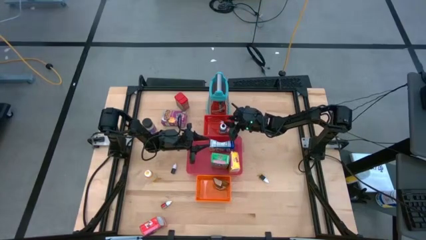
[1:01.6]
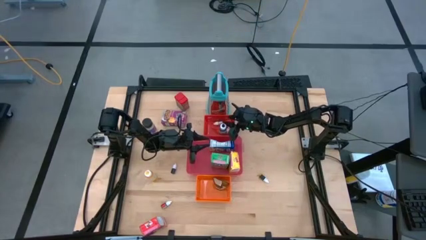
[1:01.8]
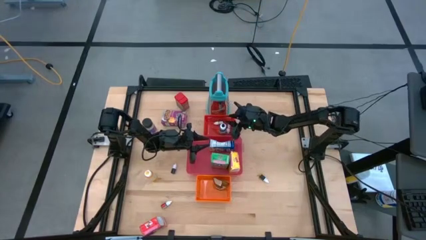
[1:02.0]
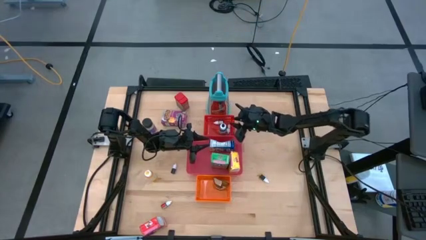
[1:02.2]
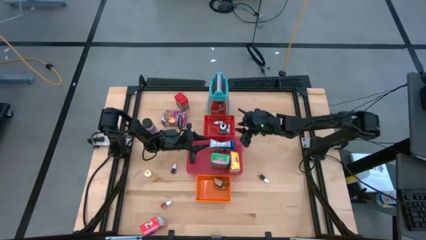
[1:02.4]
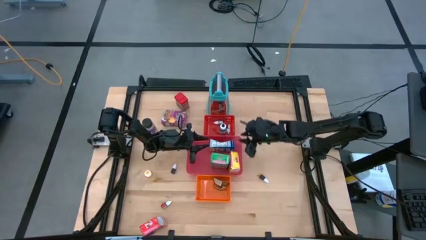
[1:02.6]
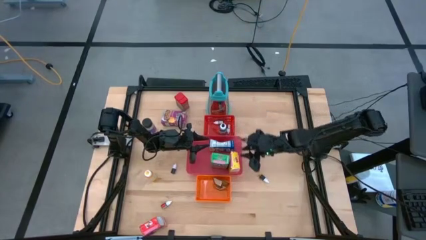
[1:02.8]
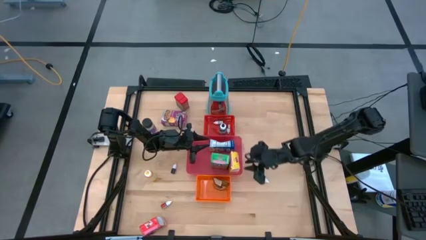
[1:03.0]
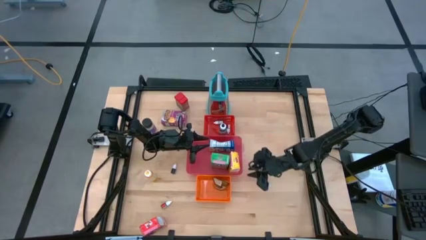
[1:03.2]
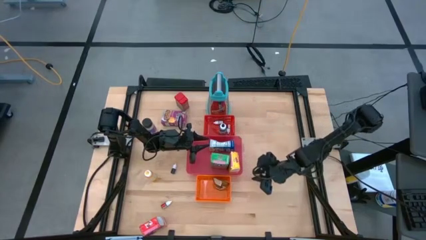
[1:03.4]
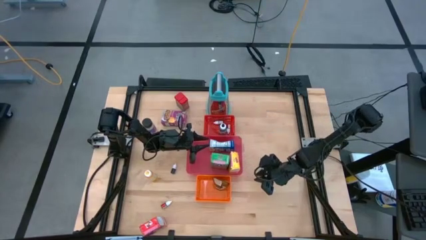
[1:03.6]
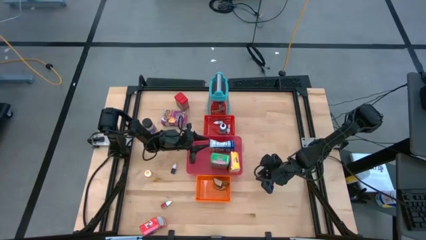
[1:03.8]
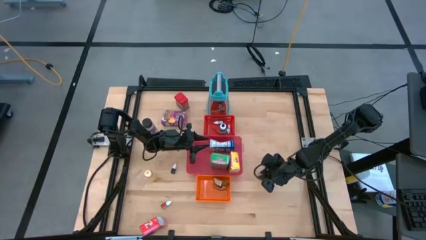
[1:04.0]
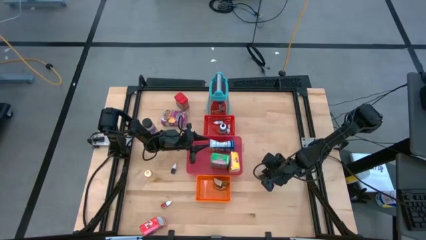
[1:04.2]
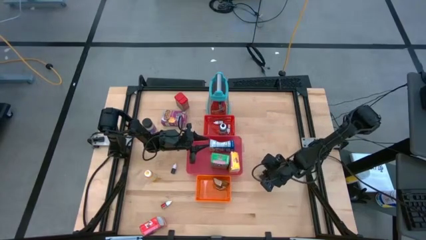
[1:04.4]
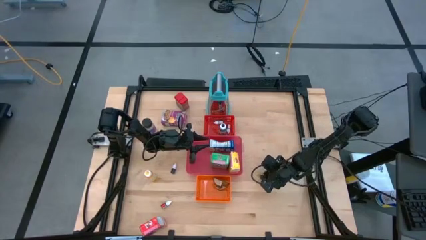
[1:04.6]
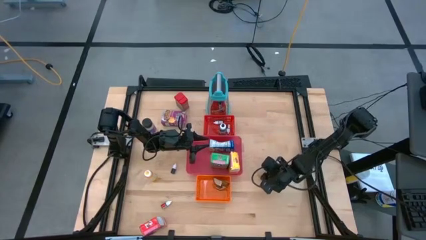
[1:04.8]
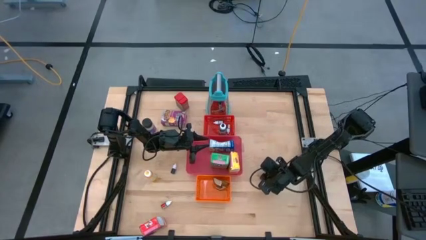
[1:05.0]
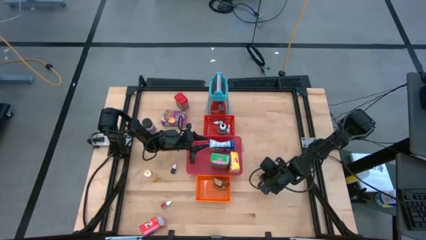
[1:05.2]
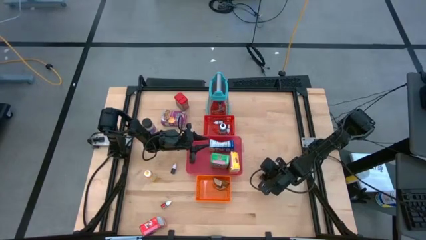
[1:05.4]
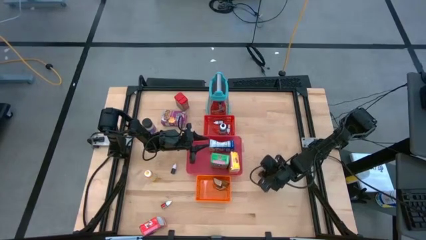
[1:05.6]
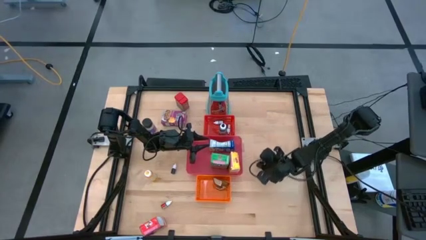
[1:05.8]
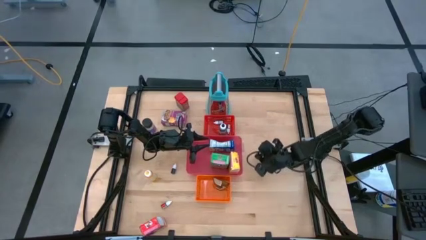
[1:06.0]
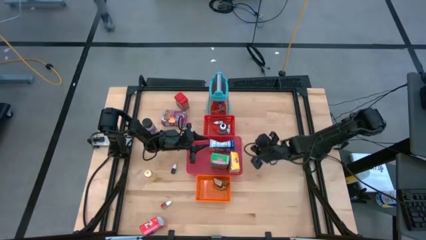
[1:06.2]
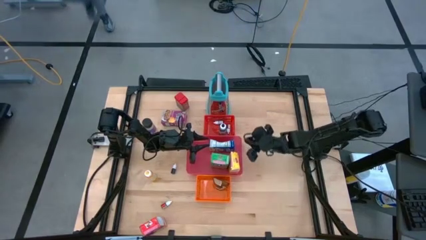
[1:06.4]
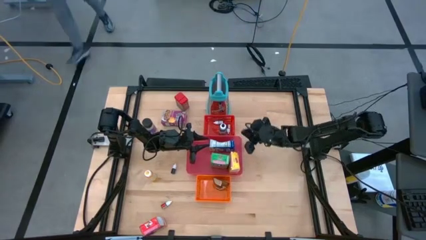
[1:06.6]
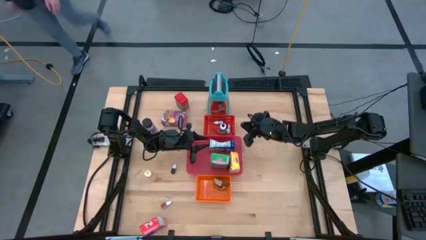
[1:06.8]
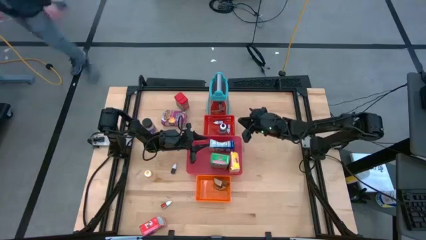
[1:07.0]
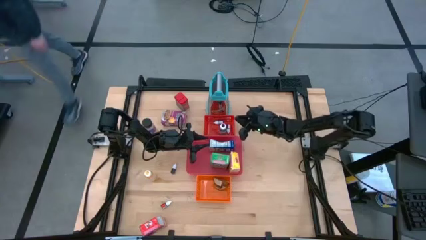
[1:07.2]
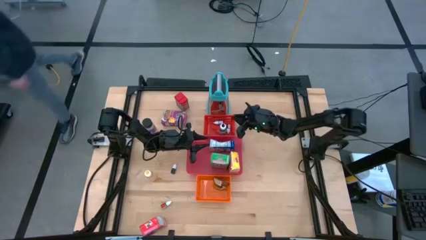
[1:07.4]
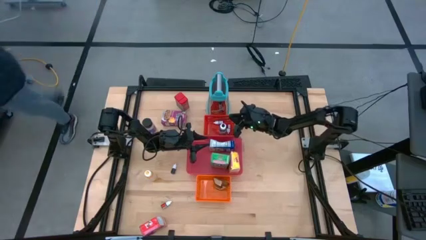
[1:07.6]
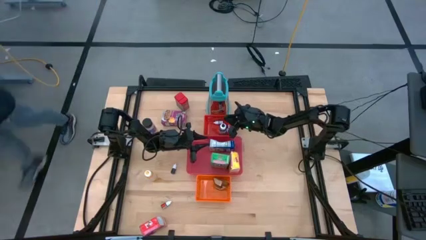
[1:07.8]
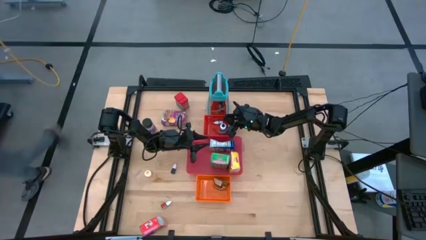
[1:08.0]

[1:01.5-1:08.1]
Task: Pick & Place Kitchen Items
Put the small violet food coloring bottle into the red bin

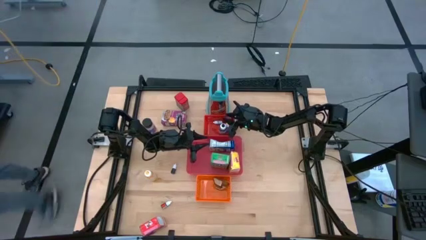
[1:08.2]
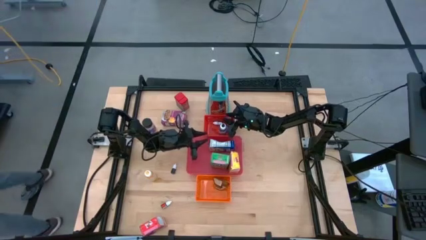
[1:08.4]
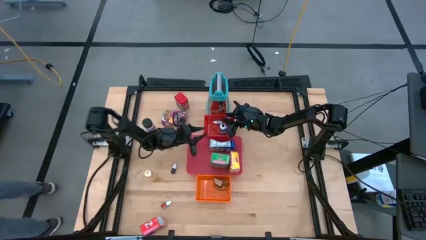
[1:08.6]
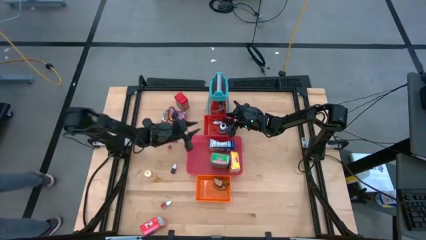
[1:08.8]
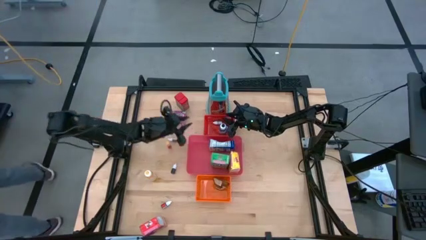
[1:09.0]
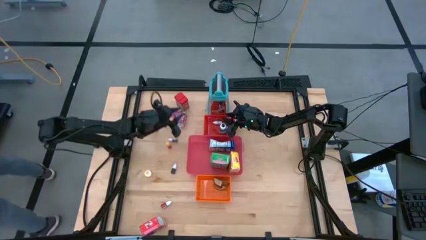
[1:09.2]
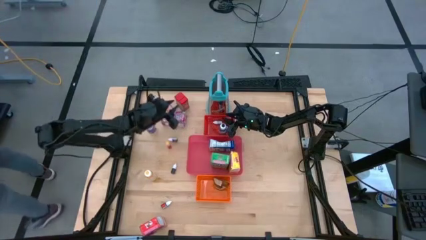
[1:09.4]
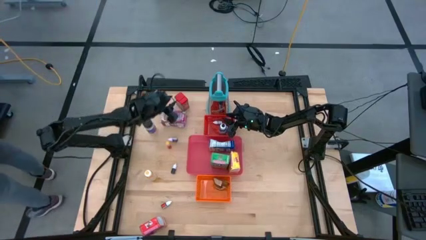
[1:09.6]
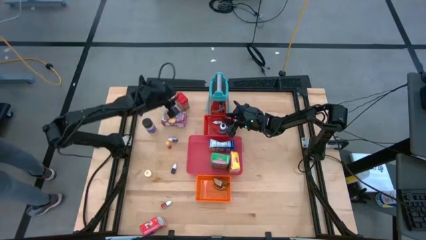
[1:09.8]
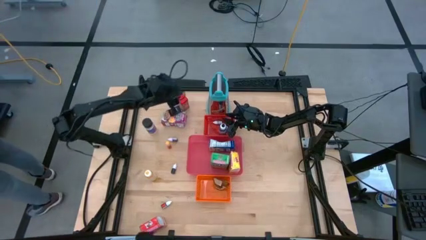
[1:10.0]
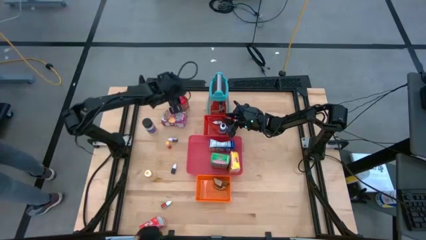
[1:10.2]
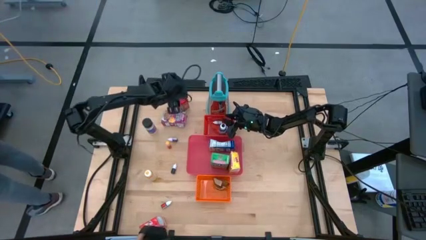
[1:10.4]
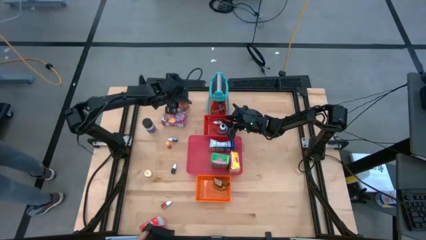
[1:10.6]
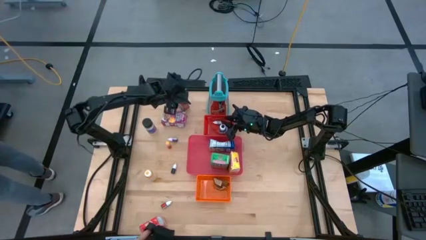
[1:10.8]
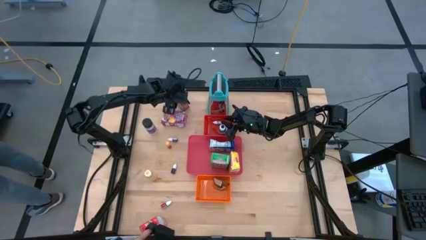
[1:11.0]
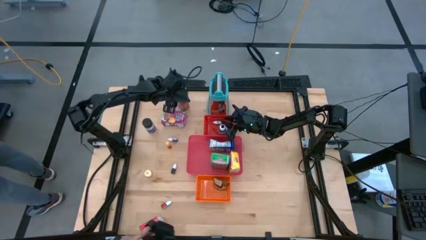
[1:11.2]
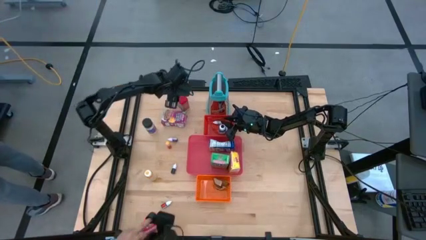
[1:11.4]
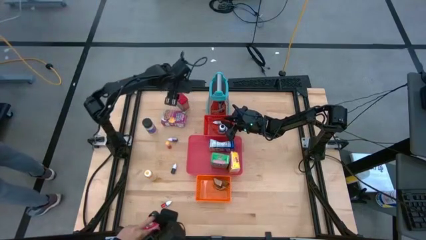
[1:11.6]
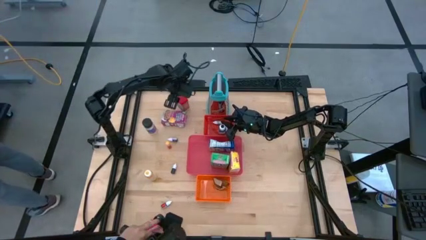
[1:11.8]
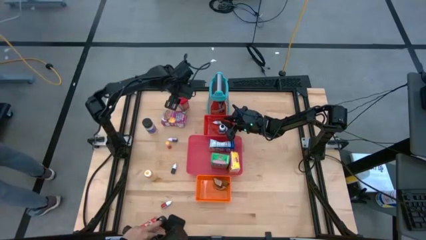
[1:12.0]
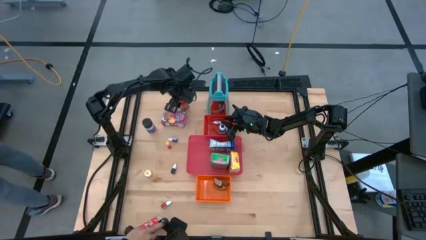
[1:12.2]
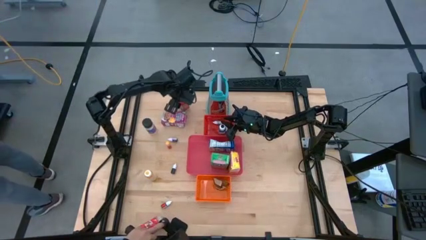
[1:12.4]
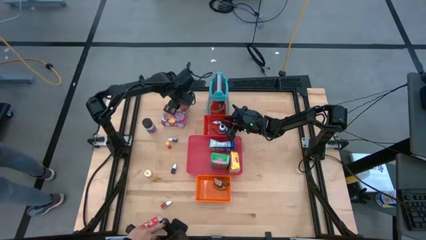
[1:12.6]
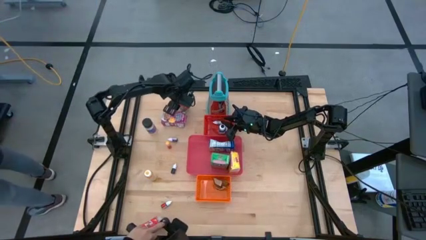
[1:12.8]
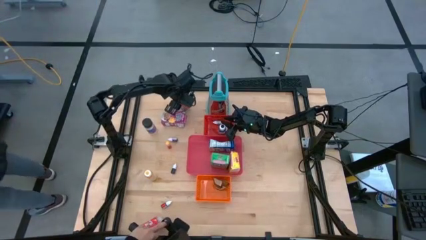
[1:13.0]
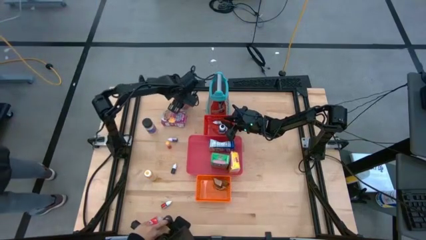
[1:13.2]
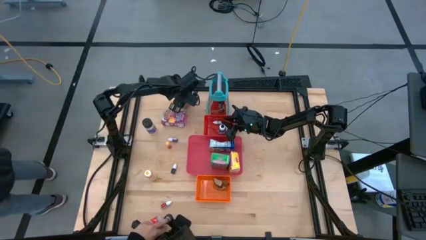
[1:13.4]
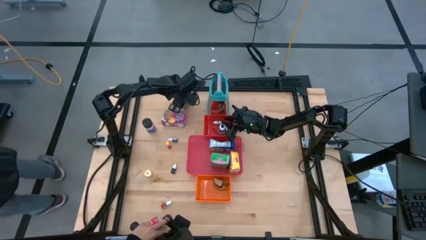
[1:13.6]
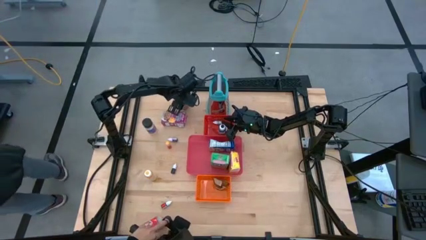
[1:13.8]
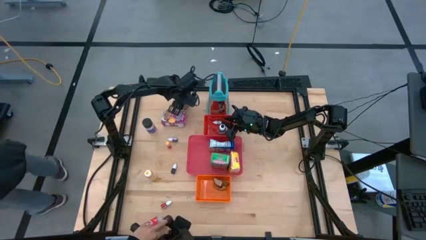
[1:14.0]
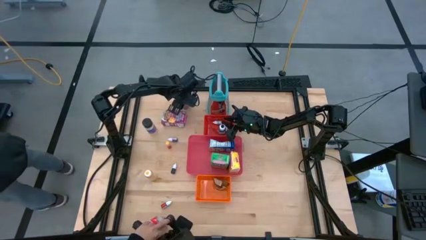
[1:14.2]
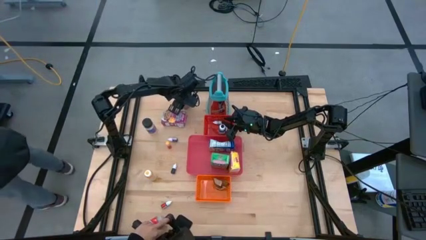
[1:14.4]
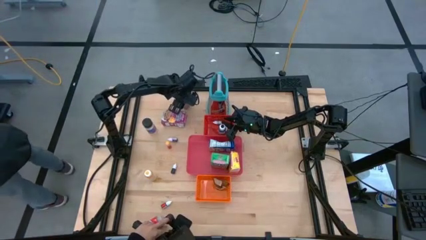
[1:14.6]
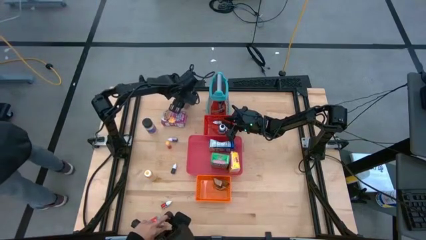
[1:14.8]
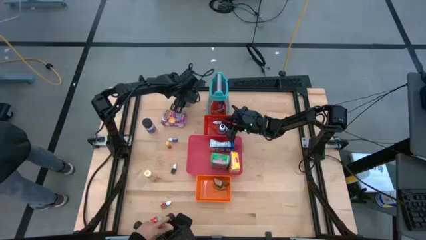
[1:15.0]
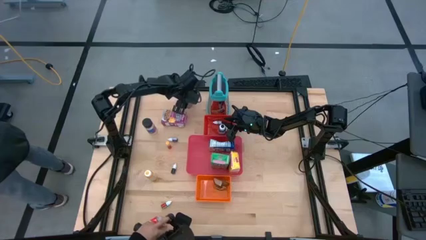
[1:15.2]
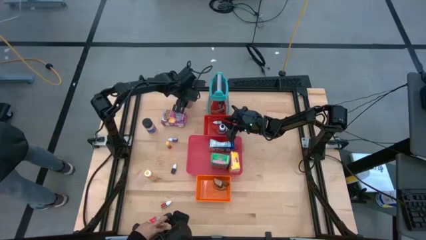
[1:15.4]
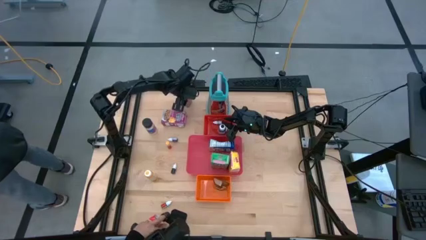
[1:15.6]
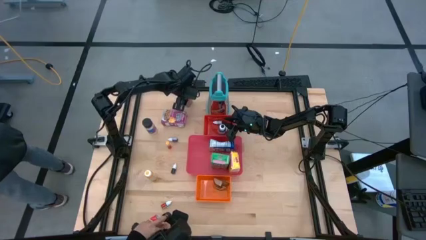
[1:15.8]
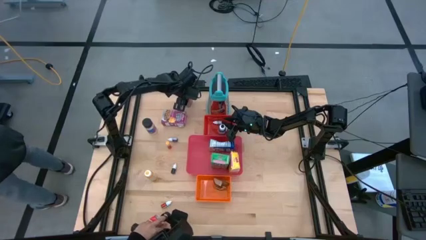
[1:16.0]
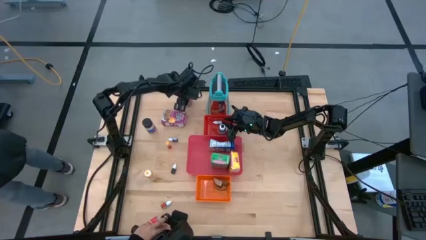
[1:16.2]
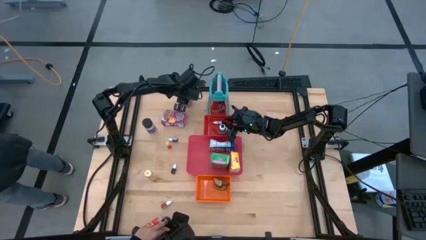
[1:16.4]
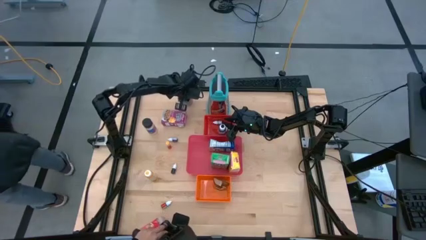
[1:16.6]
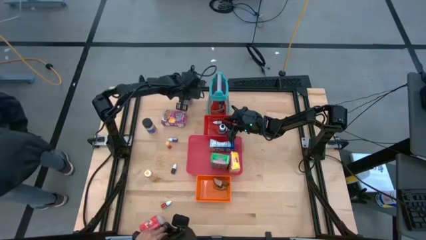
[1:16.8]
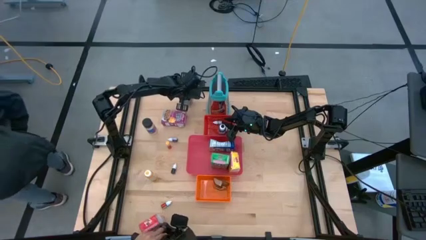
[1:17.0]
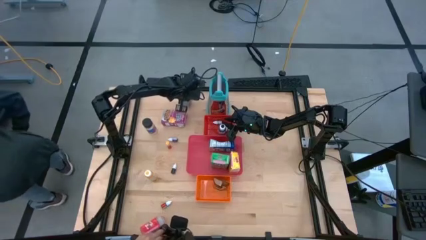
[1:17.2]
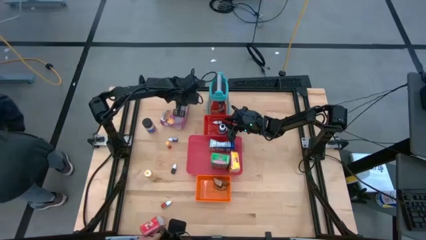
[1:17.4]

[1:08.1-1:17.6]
Put the red seasoning can into the orange bin
